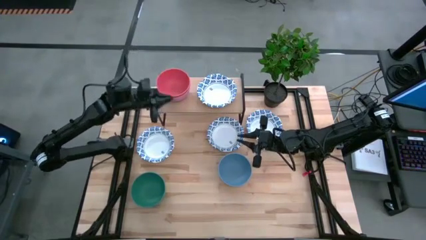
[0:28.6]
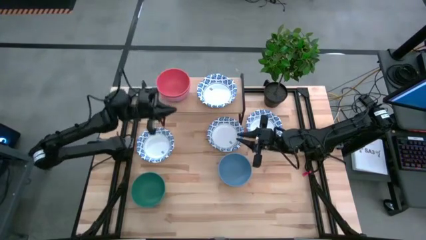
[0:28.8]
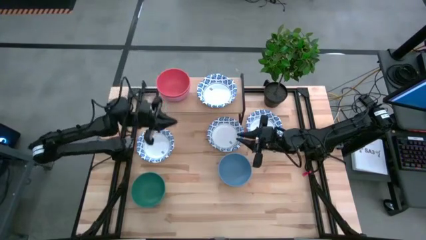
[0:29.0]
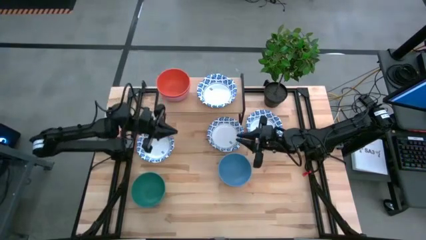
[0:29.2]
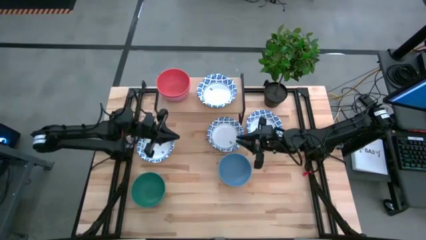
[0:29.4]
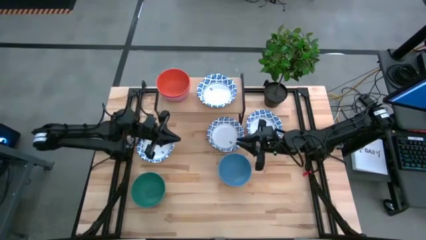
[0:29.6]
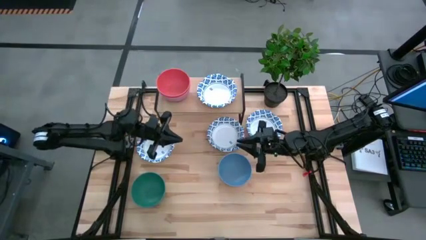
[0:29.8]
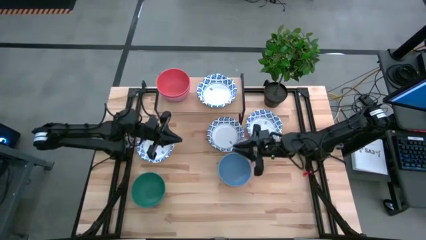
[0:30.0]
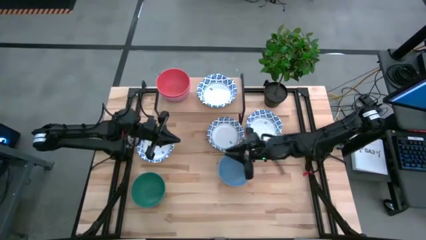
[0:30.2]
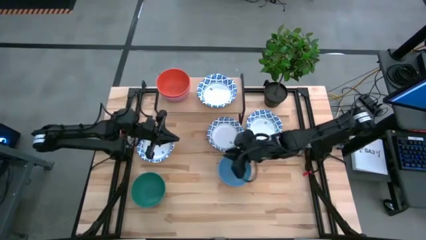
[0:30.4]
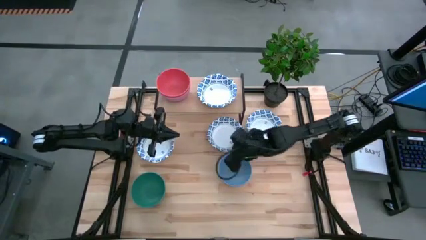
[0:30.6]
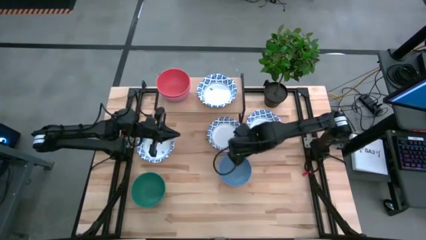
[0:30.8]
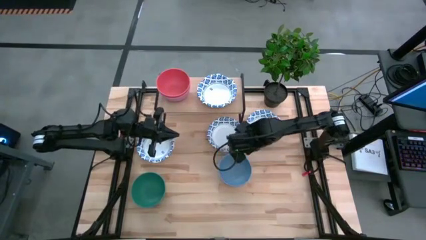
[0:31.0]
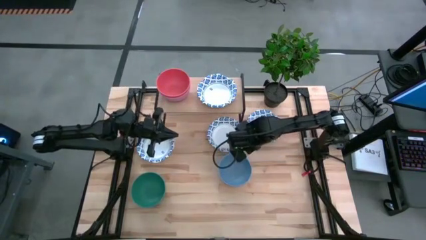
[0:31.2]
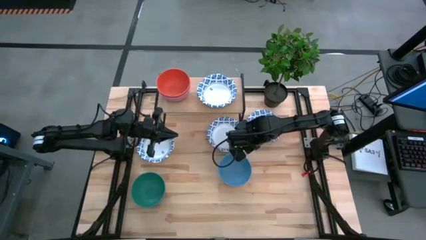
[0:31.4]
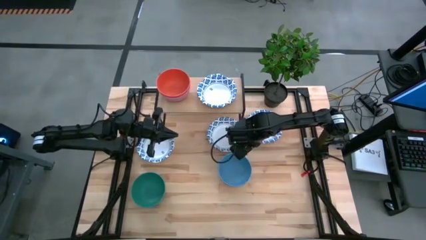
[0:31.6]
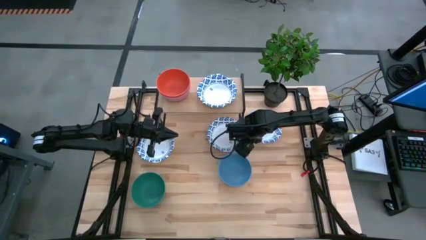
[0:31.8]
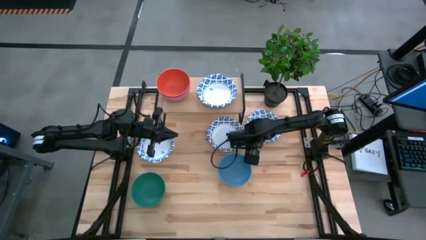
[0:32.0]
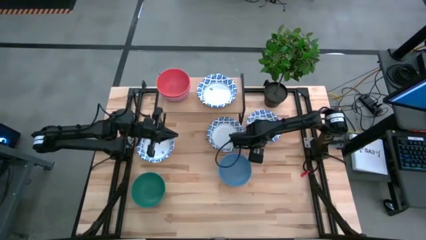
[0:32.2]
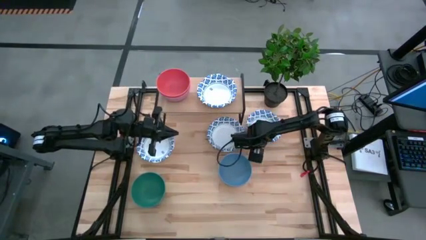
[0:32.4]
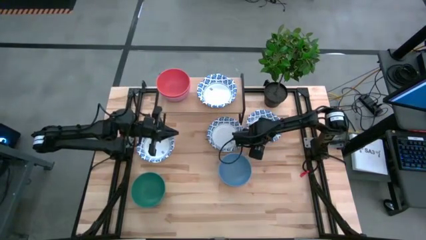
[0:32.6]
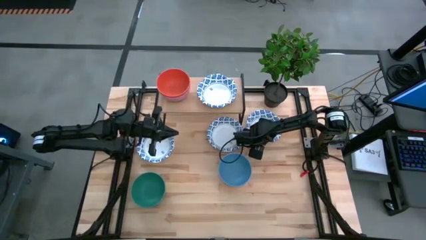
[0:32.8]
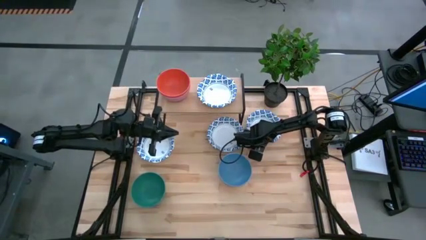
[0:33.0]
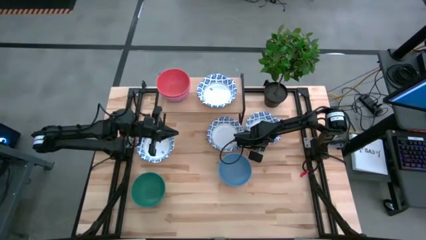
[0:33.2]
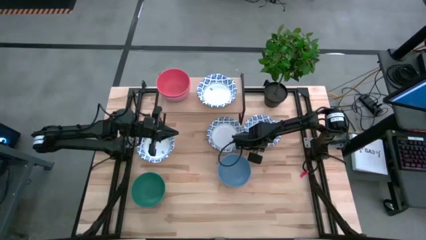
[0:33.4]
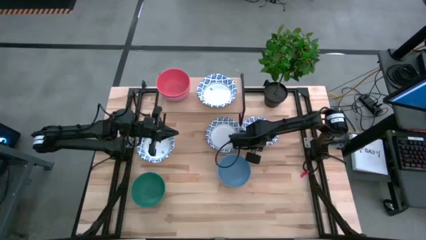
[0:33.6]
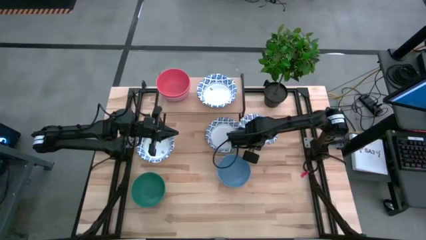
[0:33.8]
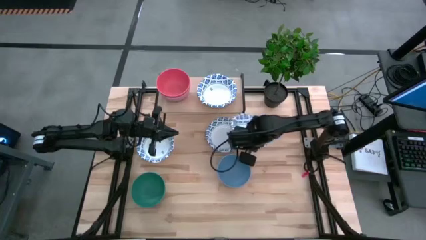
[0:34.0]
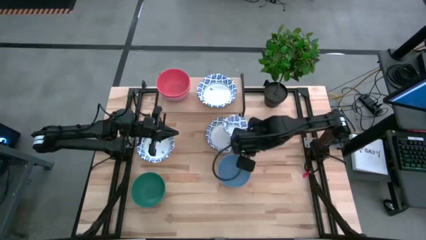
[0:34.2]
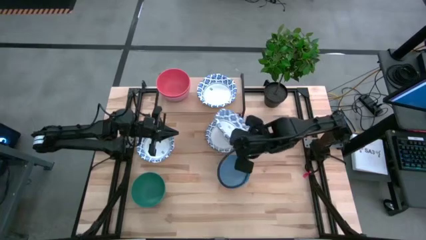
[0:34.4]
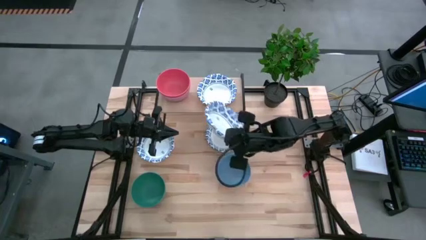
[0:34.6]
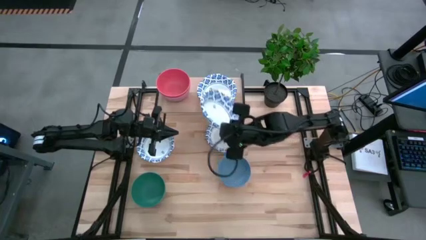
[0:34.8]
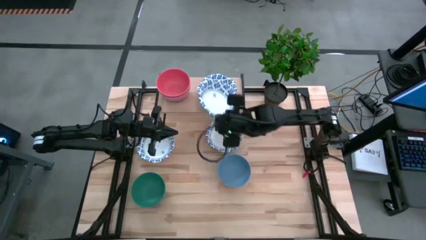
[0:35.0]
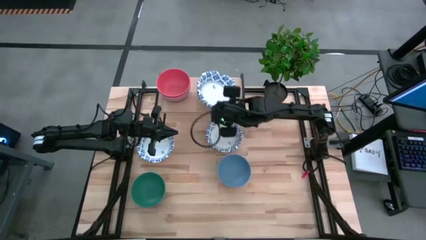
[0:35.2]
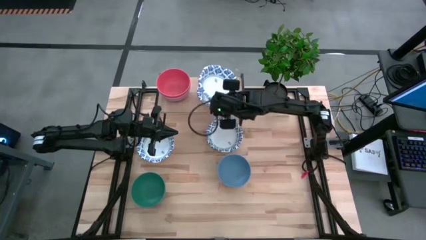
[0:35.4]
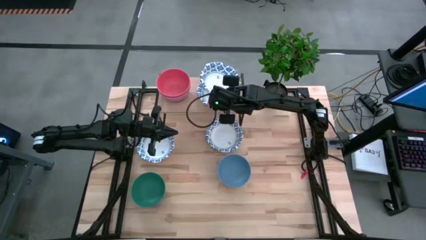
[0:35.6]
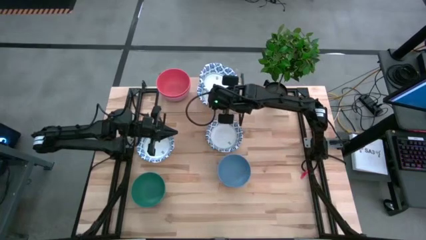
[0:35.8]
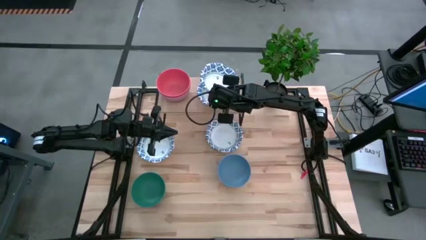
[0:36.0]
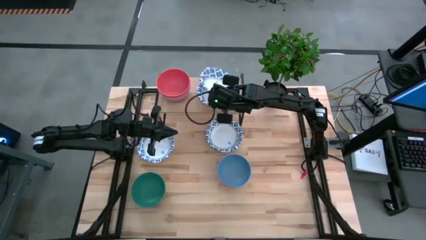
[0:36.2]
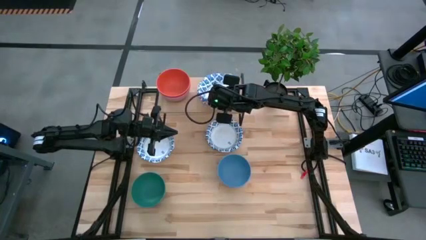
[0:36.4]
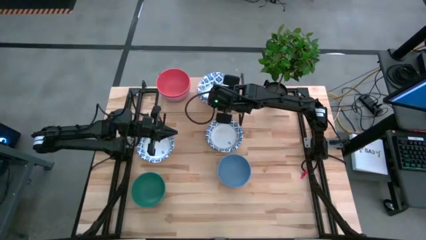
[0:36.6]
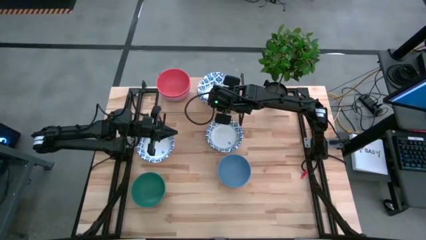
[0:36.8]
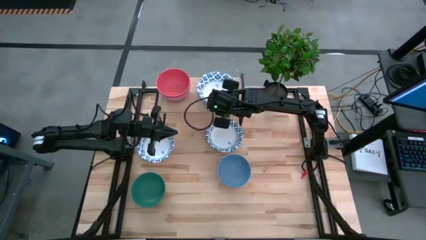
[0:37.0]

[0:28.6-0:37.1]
Task: Place and stack bowls onto a shelf
Stack the right white bowl on the white bowl on the shelf

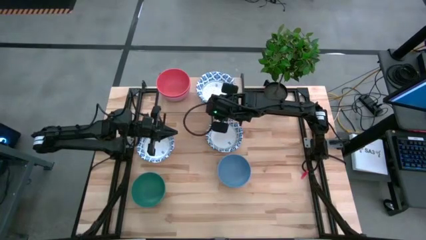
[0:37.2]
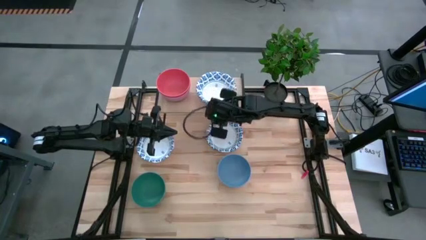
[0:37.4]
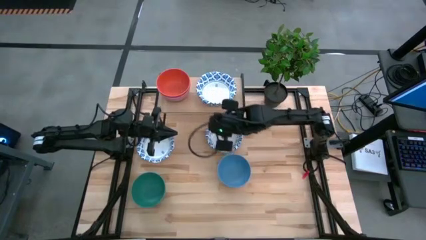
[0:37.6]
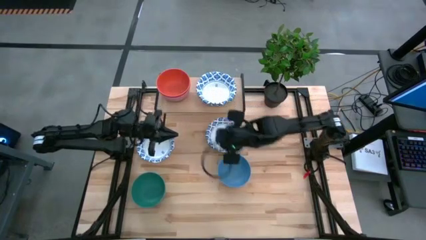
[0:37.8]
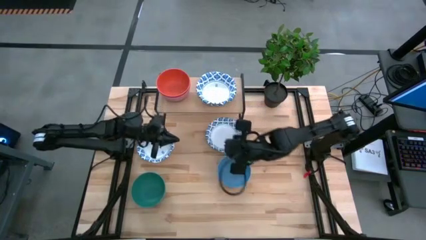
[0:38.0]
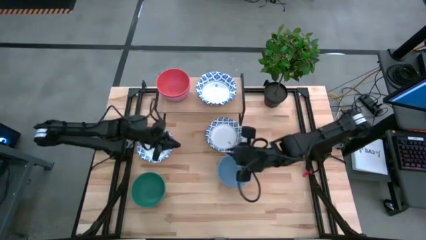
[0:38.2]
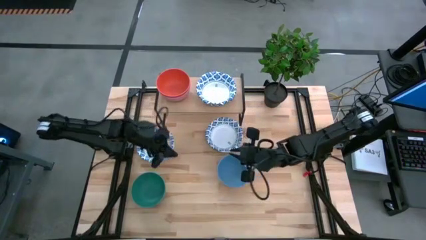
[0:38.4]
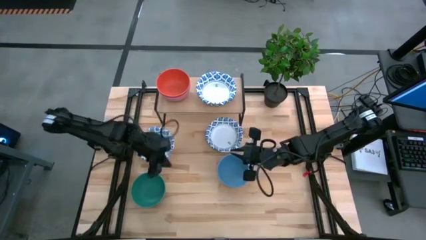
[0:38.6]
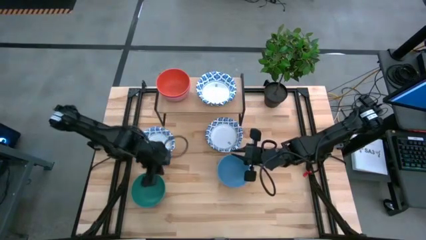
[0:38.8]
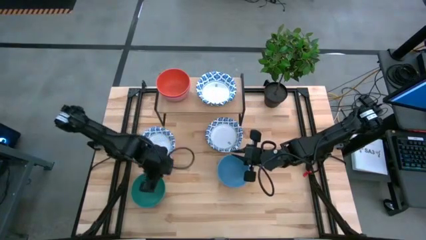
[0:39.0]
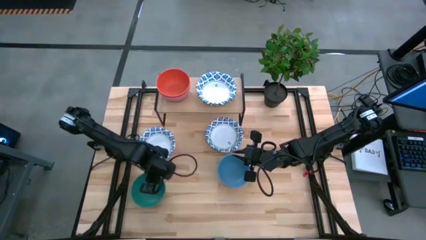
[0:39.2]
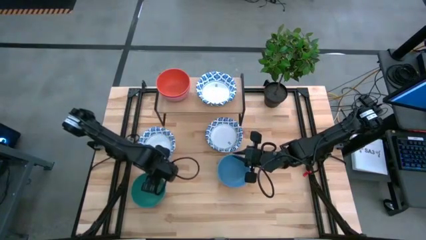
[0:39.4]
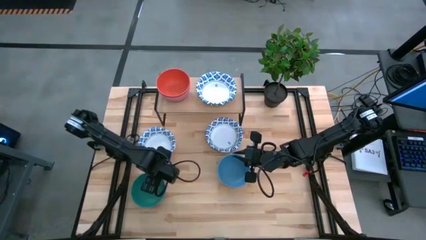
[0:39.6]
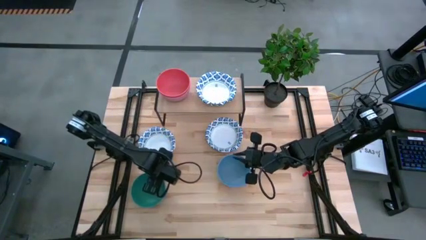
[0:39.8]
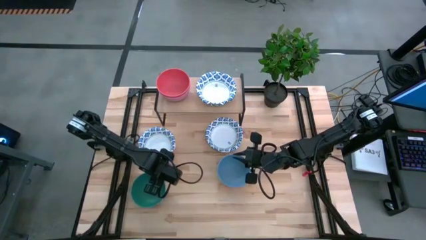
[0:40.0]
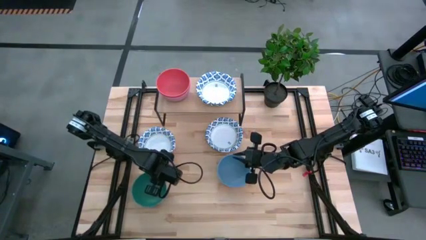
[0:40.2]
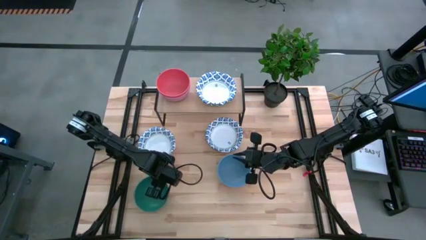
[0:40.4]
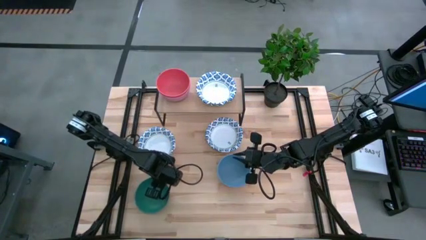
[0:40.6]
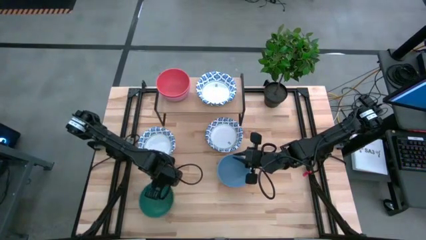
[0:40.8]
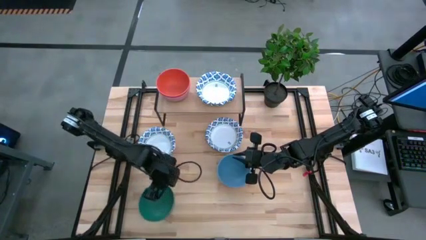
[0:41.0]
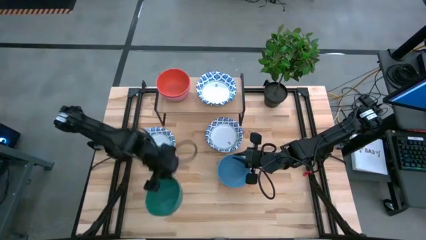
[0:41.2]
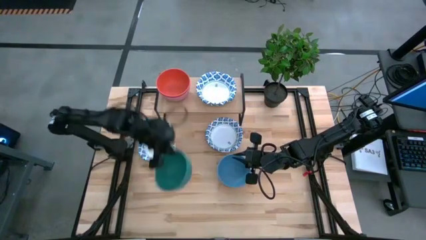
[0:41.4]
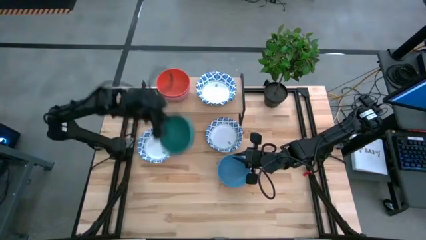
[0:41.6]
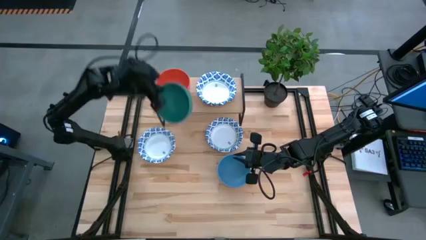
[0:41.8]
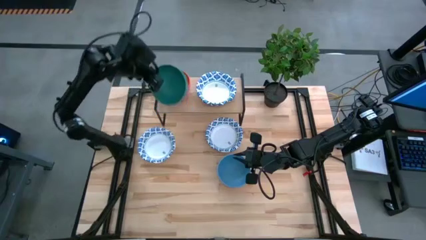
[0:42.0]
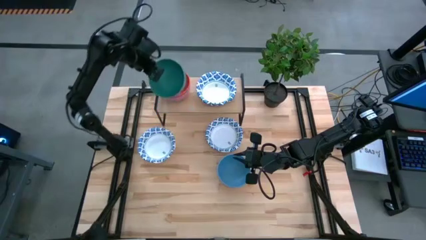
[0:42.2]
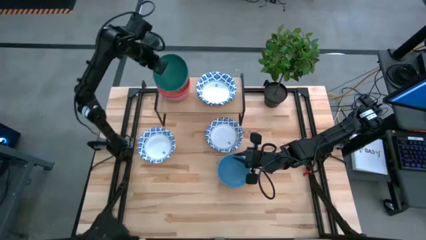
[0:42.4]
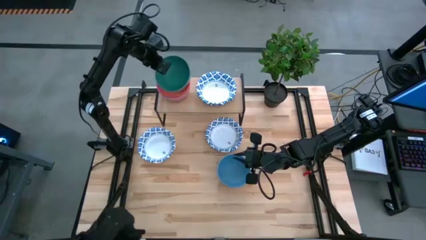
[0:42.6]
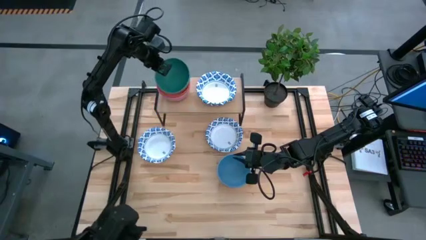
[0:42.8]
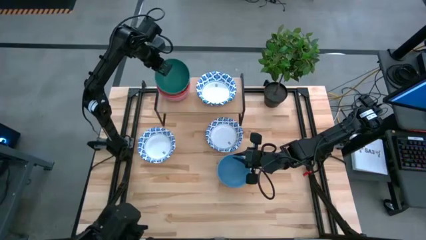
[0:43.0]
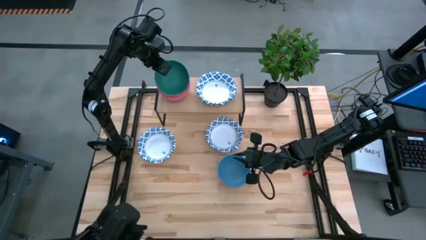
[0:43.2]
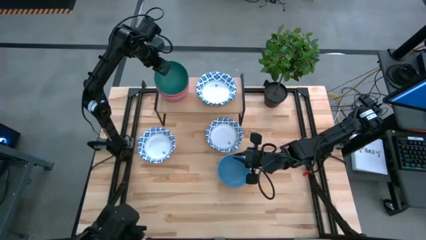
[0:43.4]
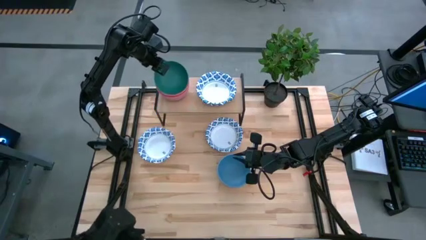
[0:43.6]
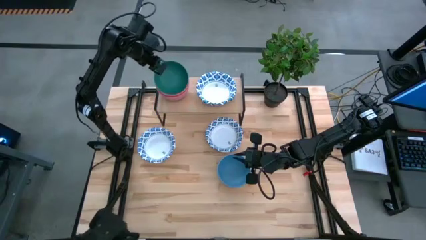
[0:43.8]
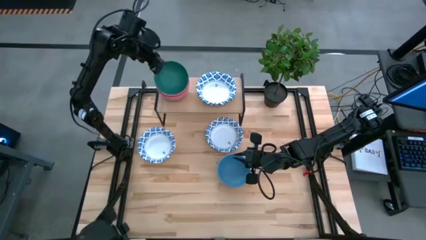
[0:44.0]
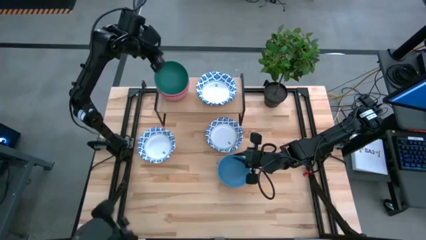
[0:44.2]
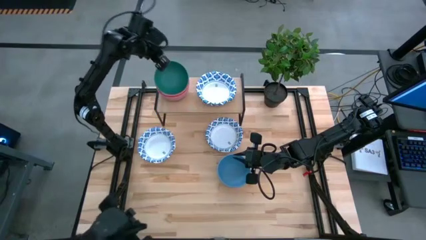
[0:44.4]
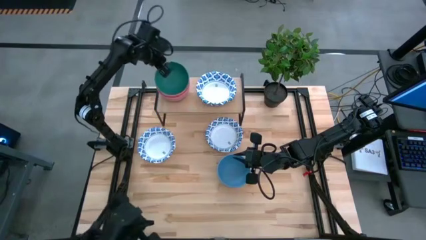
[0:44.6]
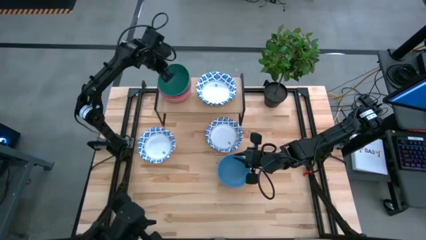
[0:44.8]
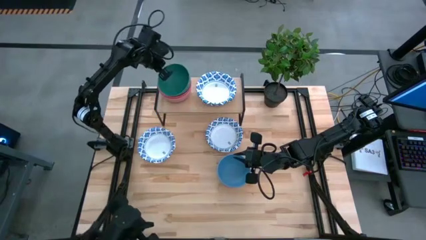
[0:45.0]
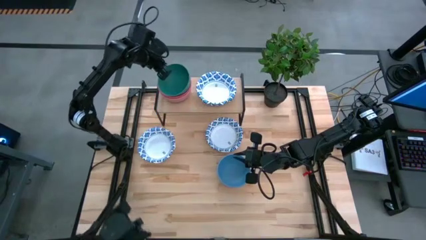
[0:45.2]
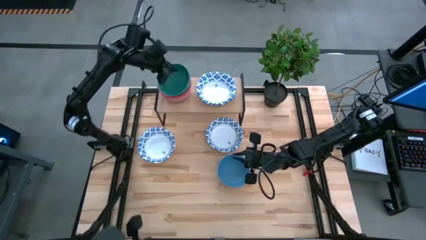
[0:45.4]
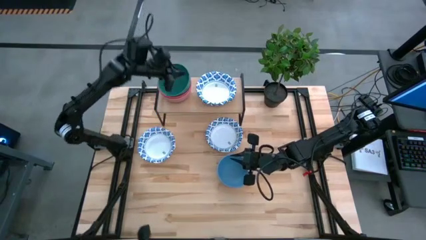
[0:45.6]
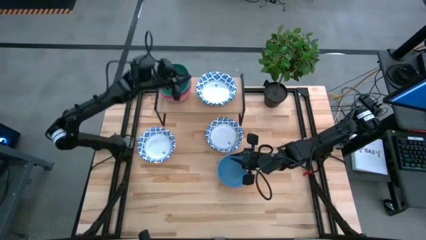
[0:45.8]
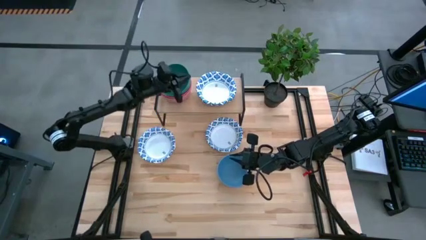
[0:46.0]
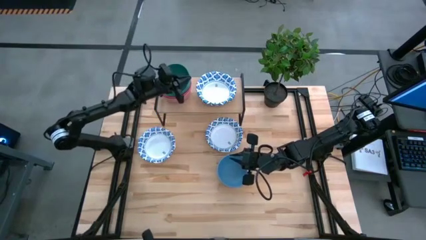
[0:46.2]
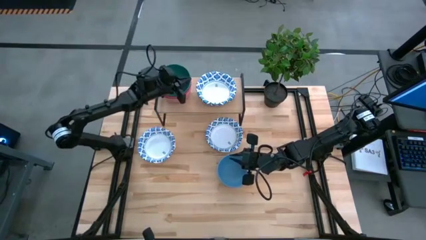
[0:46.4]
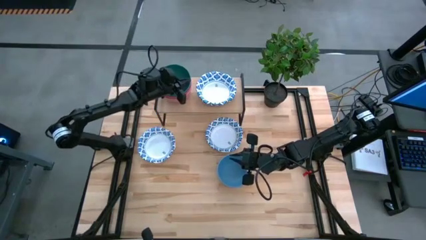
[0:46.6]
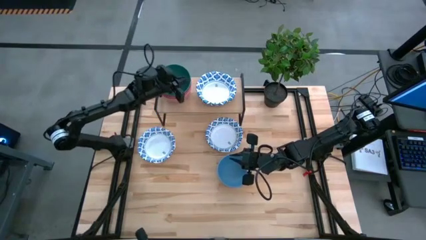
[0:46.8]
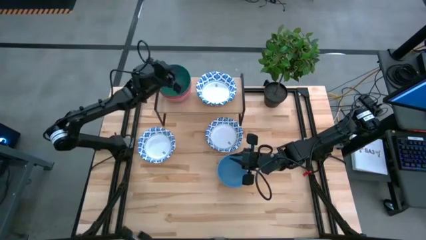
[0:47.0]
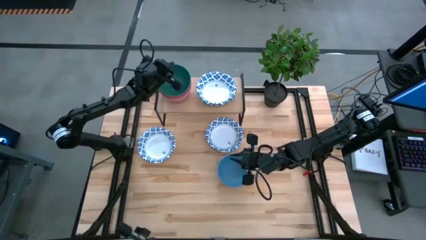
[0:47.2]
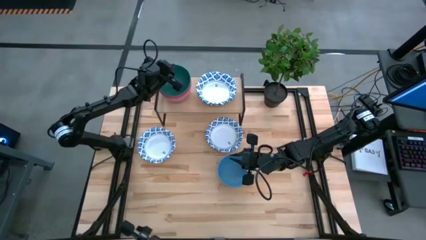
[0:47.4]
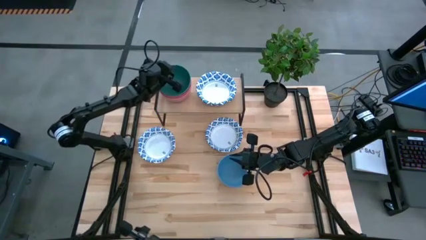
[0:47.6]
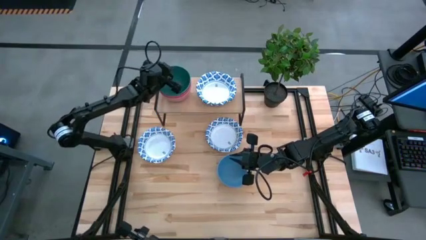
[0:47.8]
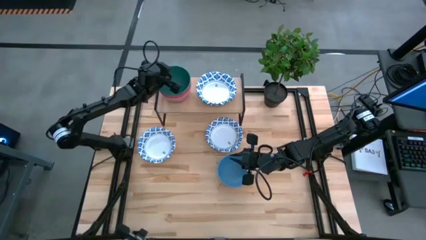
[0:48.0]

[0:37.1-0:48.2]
Stack the green bowl on the orange bowl on the shelf
